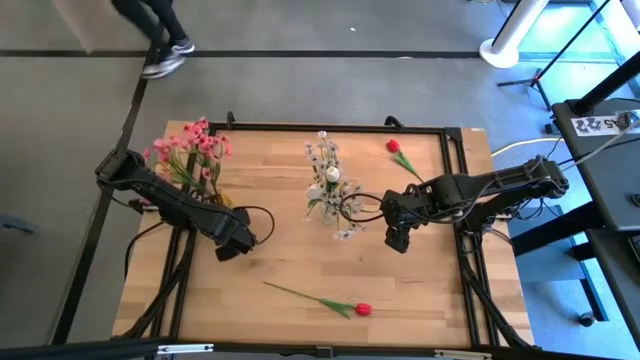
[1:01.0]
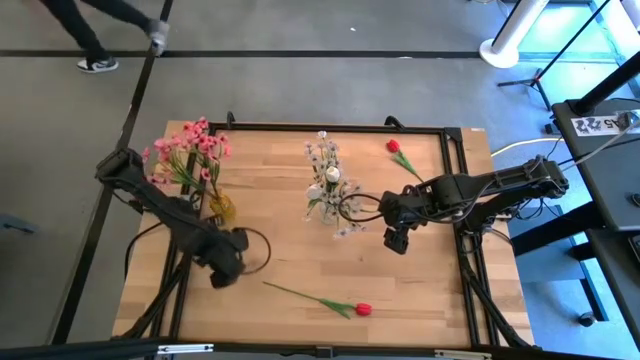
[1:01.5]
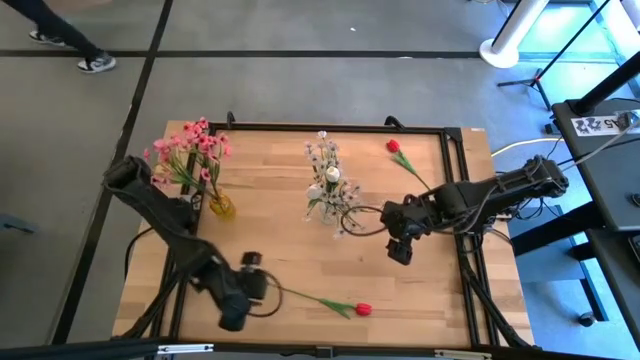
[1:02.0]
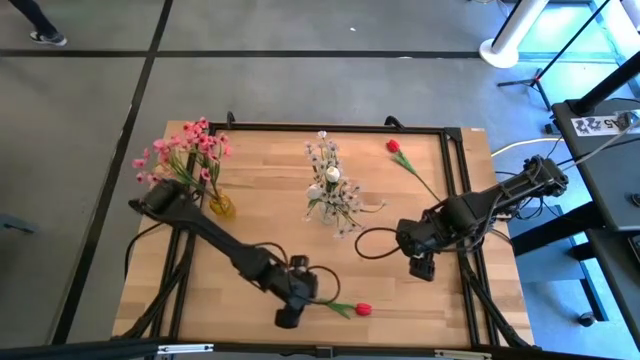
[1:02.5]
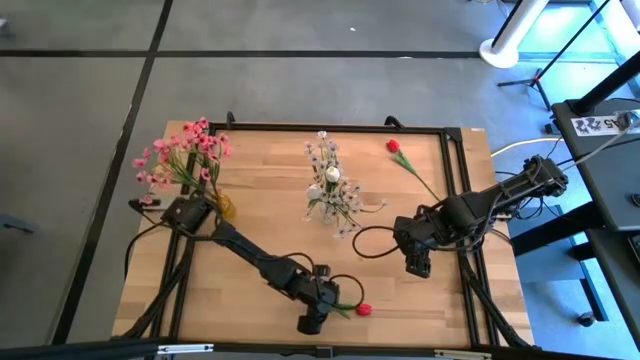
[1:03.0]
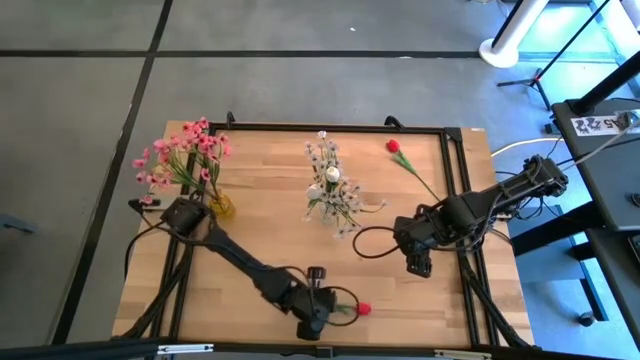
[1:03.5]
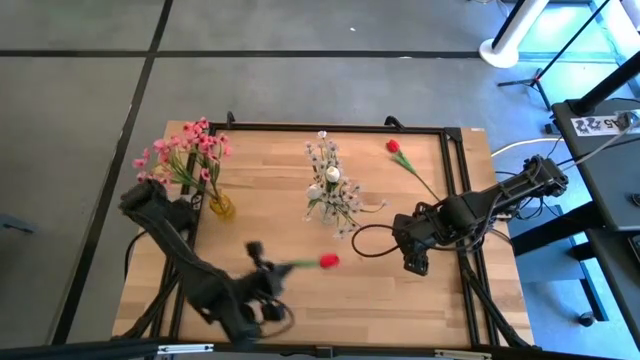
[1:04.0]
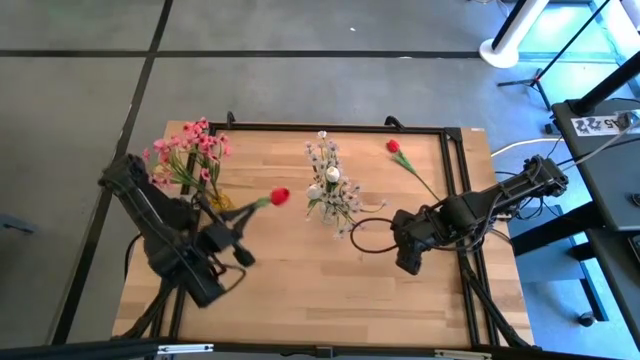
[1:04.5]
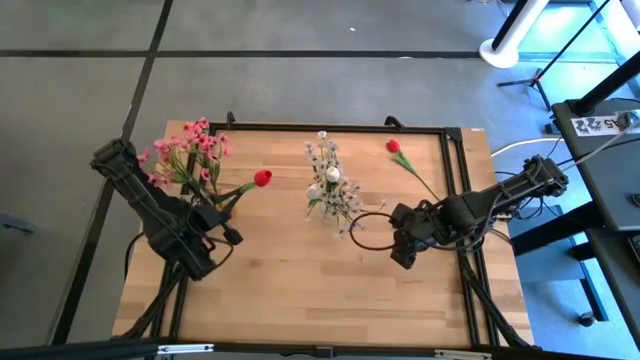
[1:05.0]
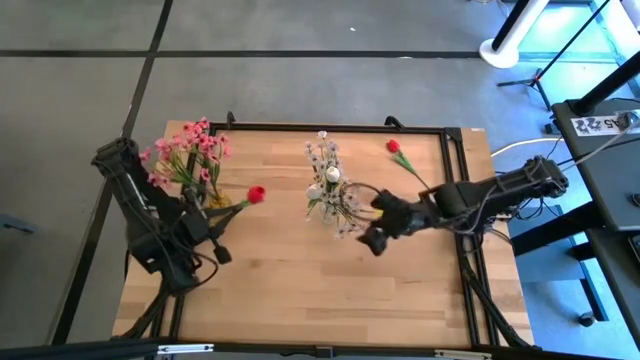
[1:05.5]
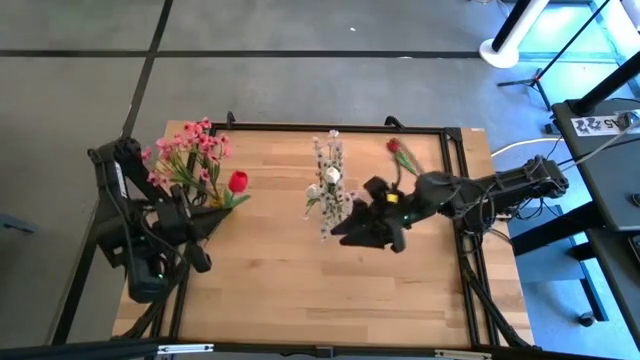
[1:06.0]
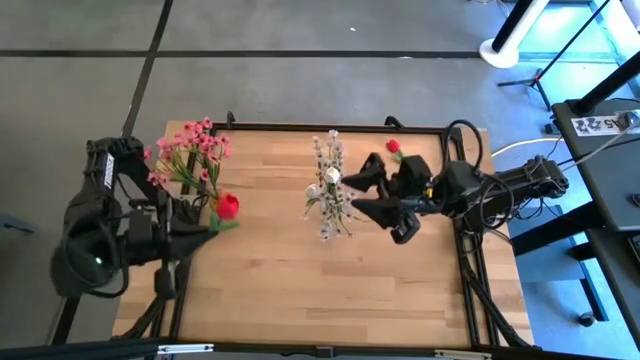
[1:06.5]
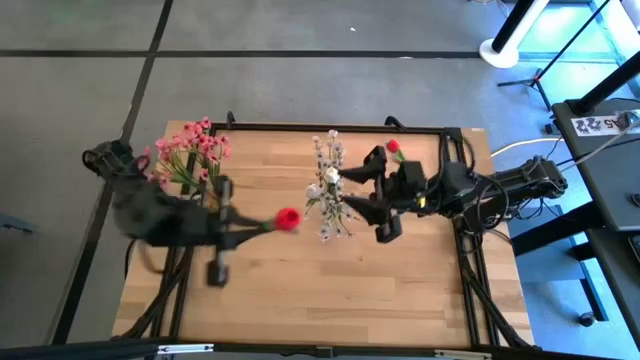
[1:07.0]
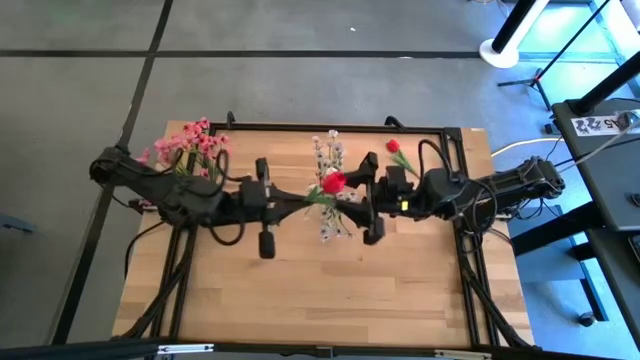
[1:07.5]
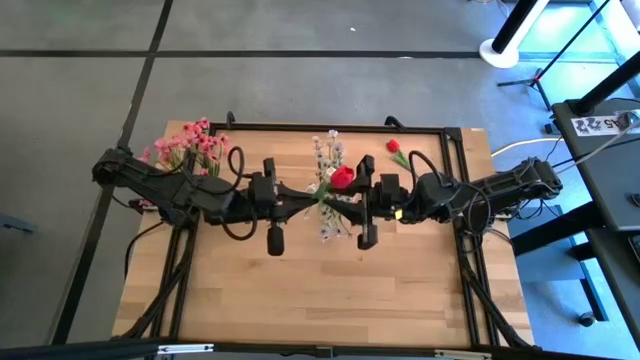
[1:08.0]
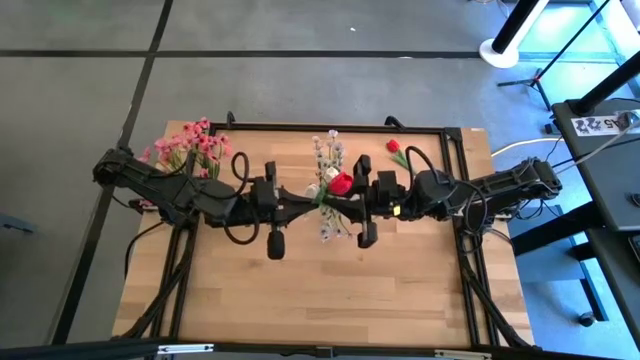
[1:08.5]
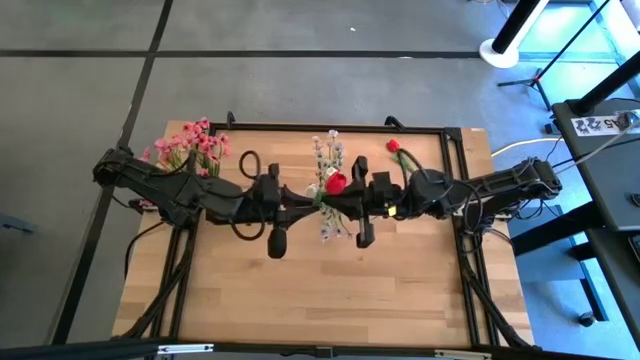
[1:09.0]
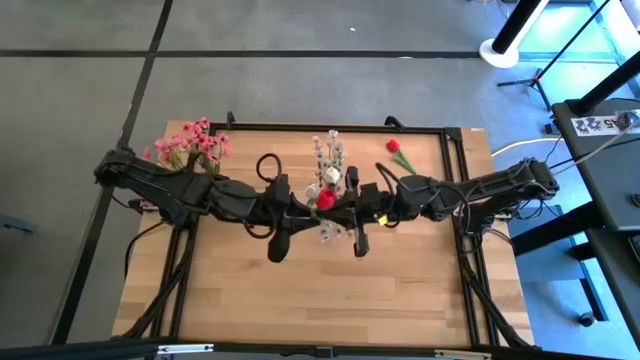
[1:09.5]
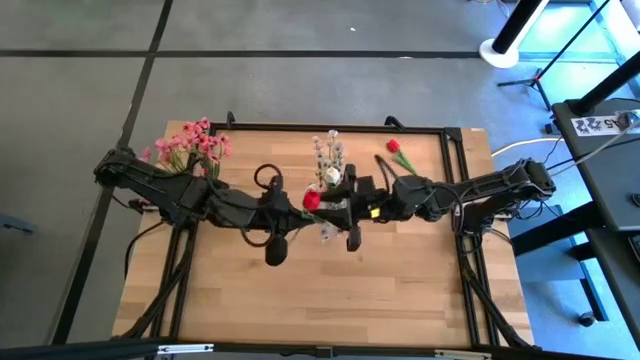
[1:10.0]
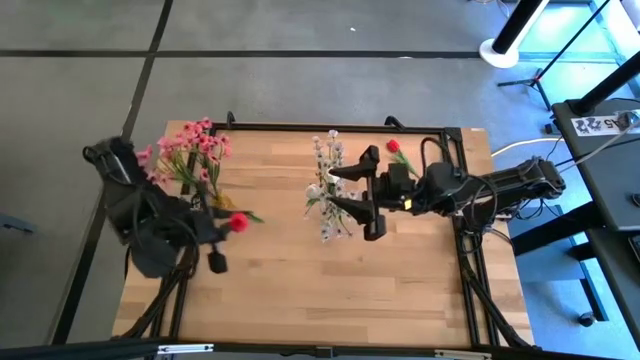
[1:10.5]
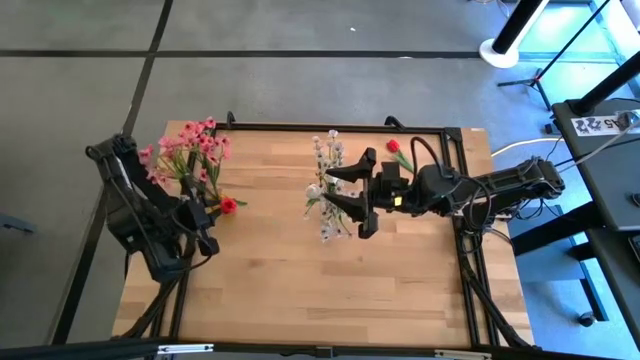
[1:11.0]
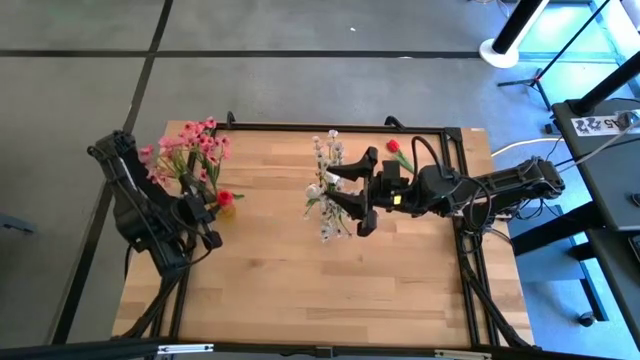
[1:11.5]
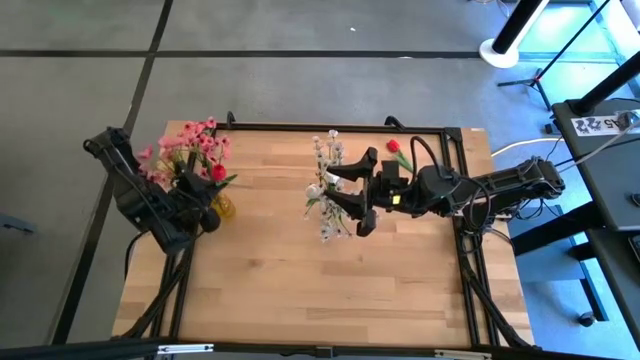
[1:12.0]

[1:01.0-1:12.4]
Task: Sort flowers into vase by color
Put the bottom red tulip into the yellow vase

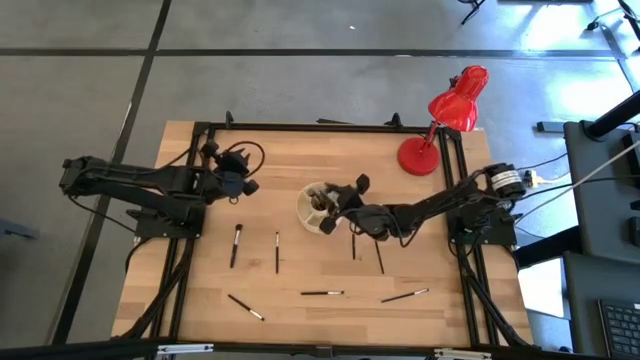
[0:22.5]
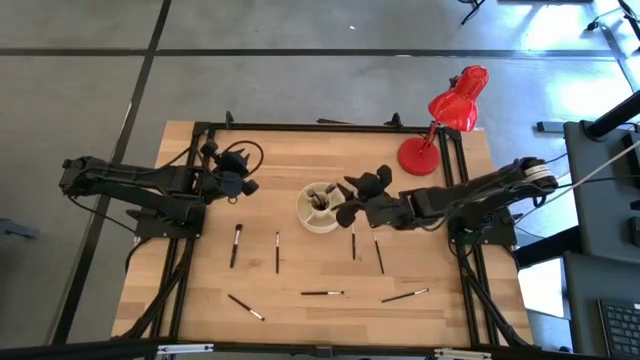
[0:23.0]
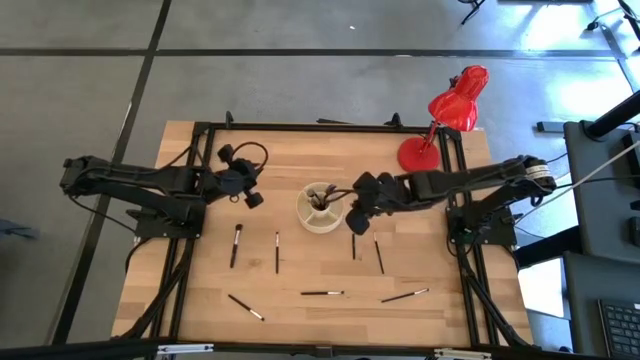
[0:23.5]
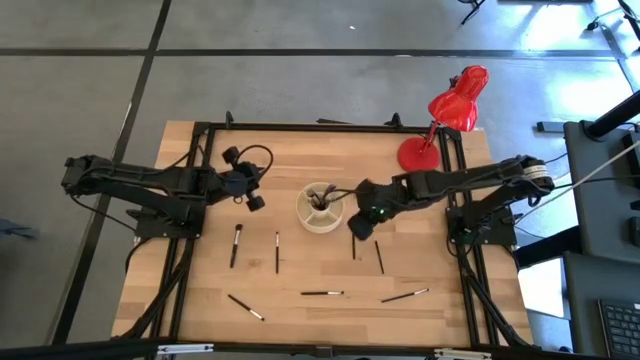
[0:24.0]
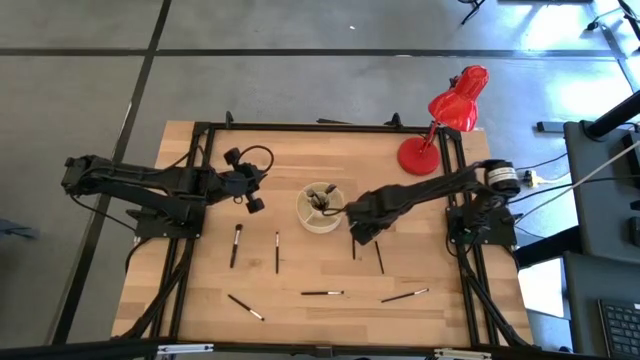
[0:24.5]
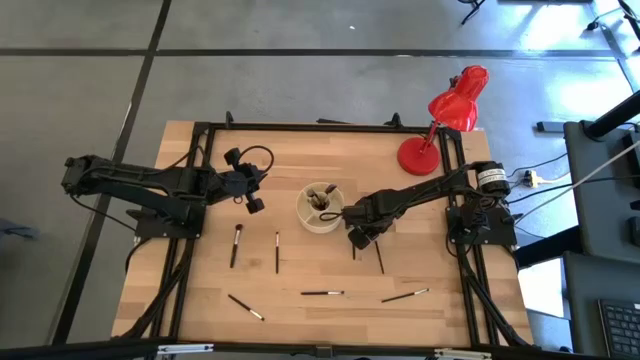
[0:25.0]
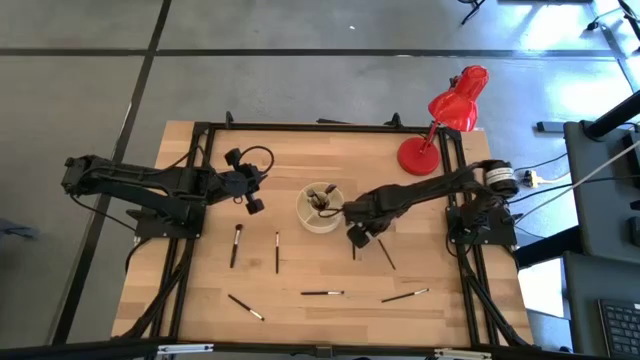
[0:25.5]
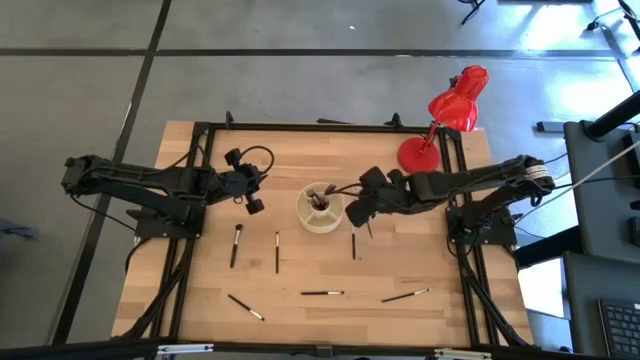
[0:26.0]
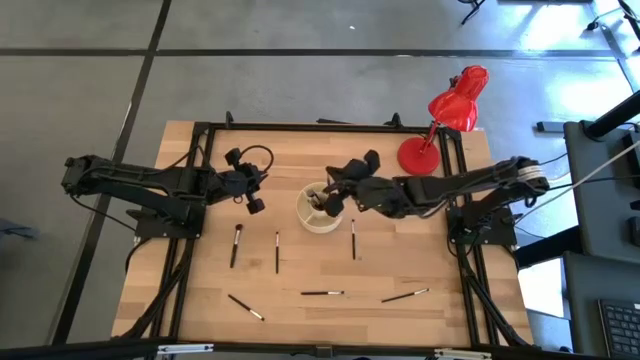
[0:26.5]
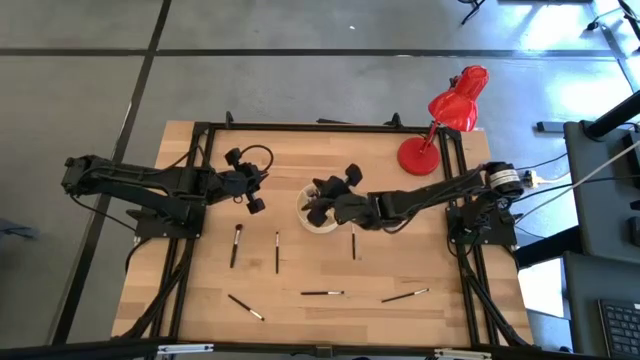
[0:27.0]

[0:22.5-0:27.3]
Task: Put items in baskets/containers
Put the liner brush into the white organizer

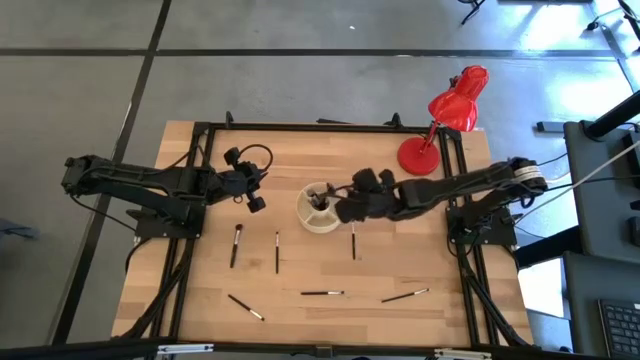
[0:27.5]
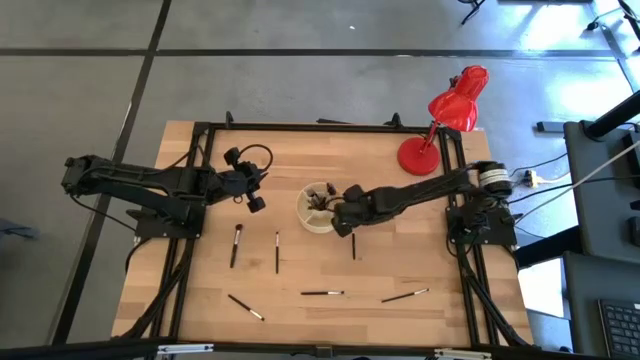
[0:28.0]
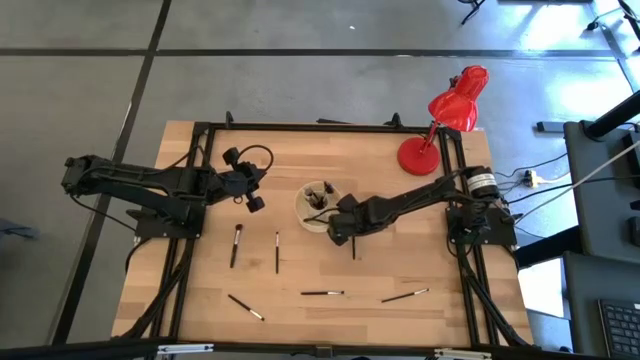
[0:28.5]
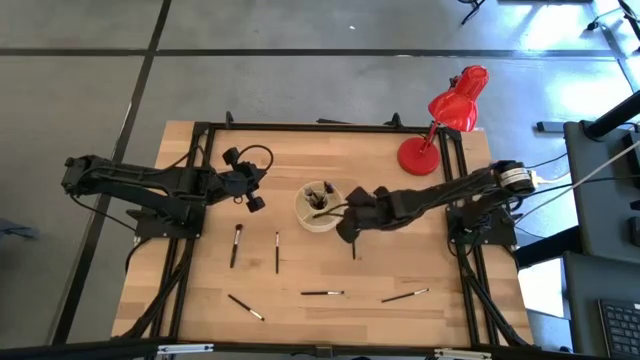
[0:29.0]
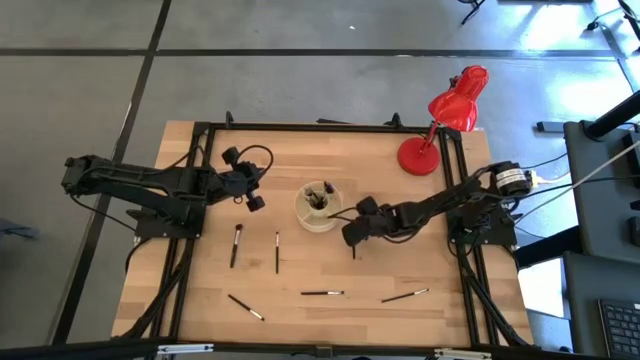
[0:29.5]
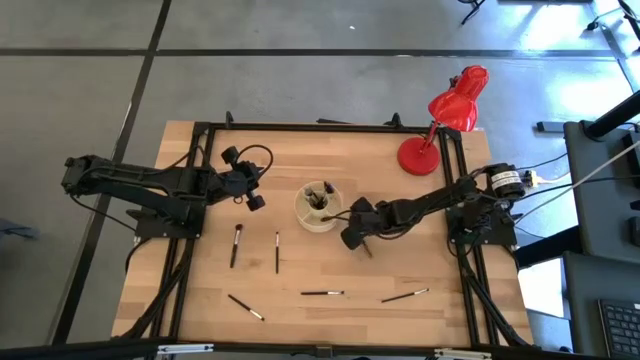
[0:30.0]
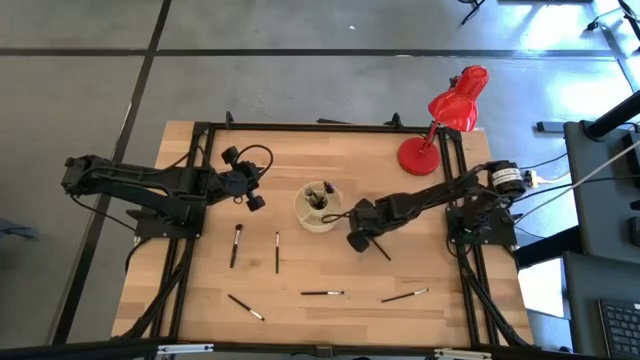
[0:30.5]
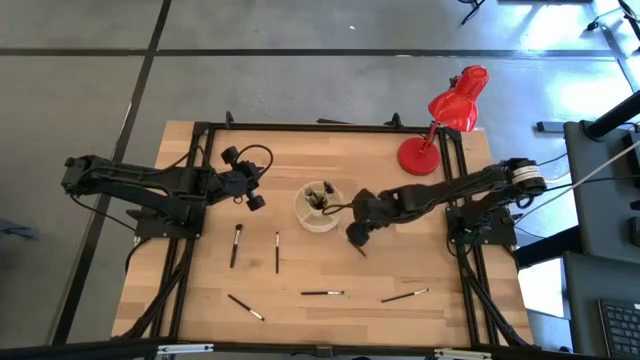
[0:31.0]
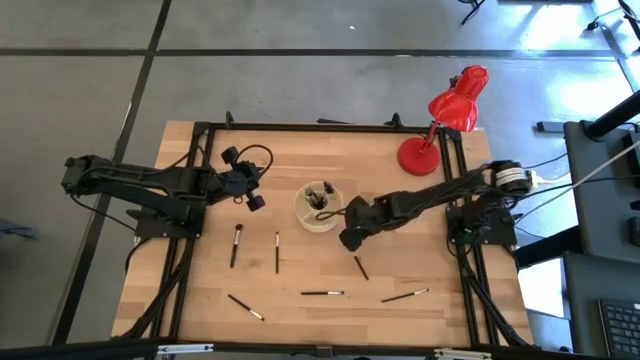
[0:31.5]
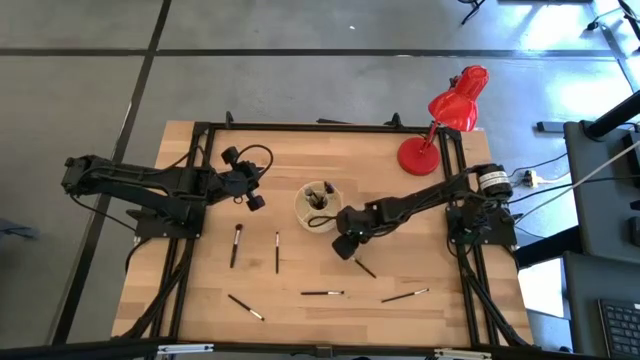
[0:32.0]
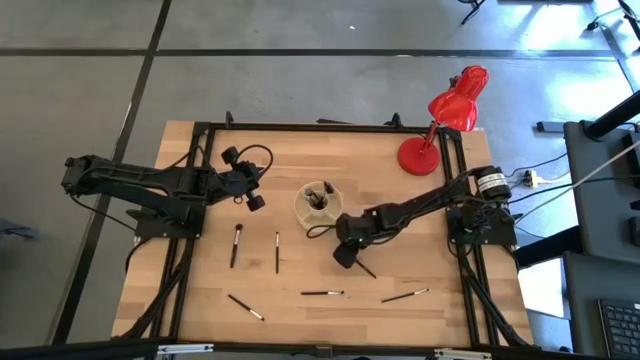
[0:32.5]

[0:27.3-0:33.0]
Put the eyeshadow brush into the white organizer

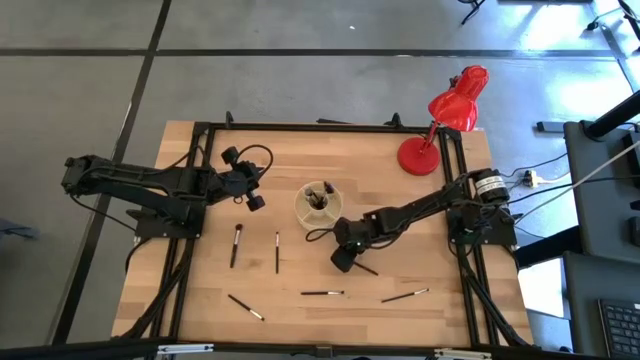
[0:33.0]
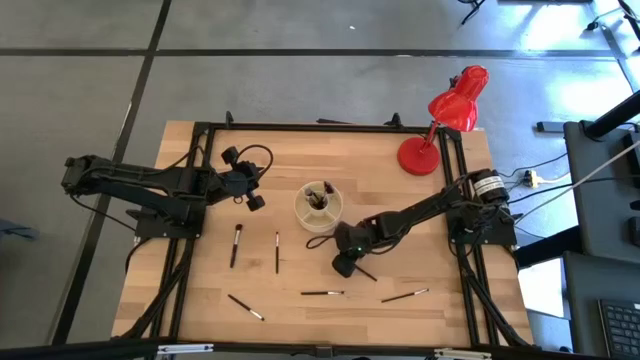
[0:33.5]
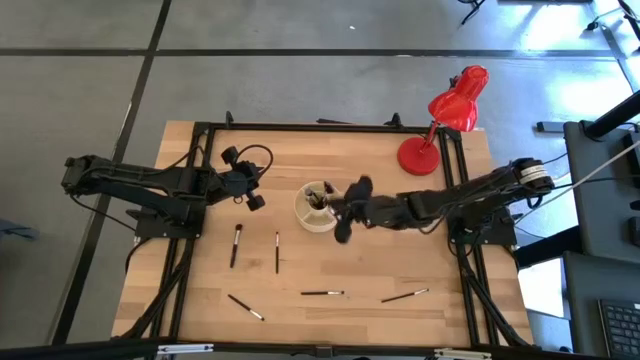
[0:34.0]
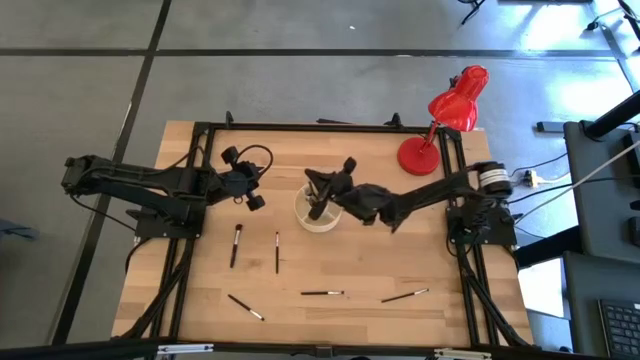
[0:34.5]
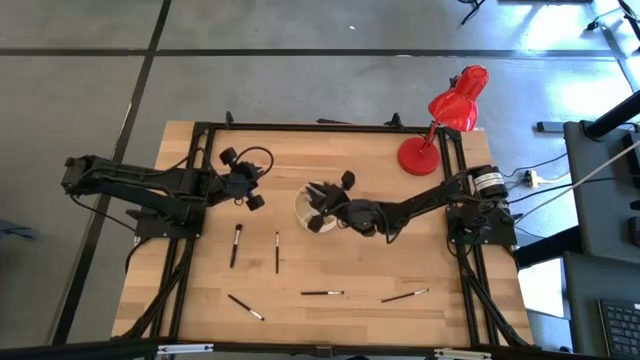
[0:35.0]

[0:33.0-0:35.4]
Put the eyeshadow brush into the white organizer
